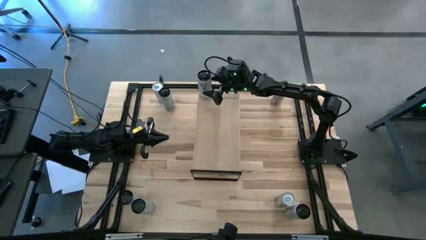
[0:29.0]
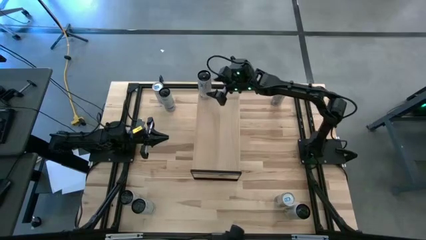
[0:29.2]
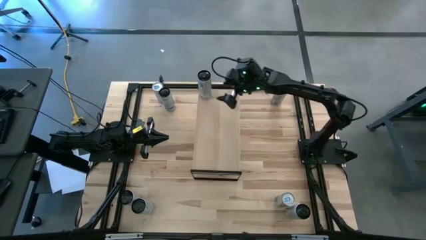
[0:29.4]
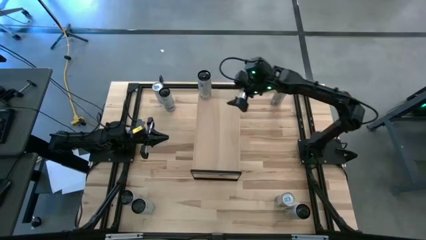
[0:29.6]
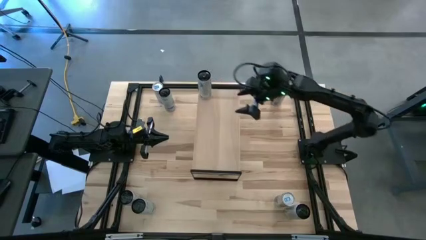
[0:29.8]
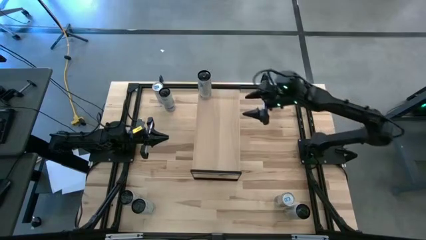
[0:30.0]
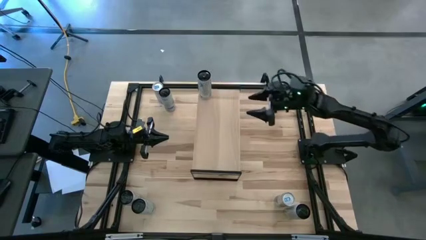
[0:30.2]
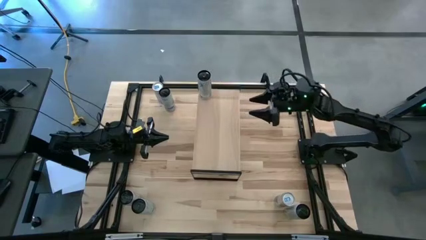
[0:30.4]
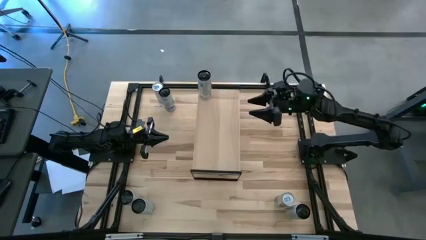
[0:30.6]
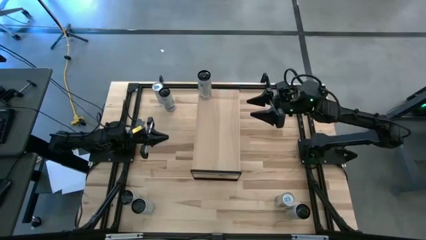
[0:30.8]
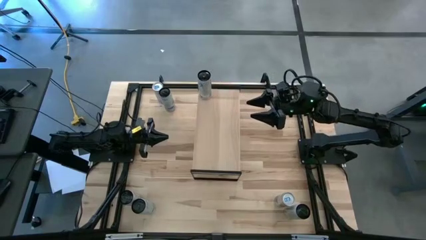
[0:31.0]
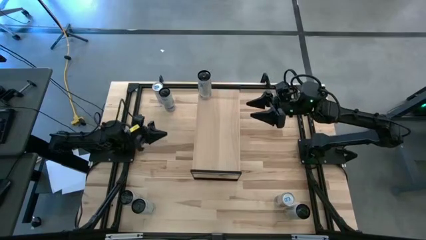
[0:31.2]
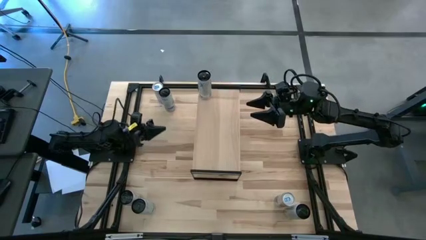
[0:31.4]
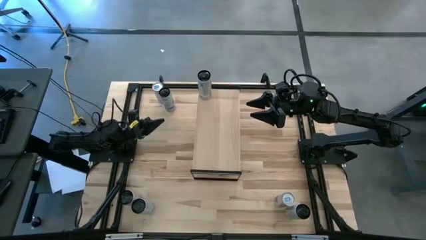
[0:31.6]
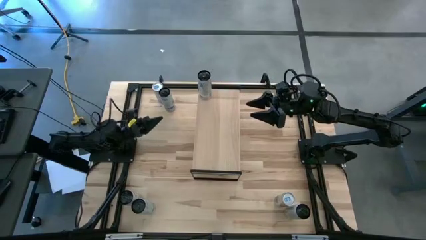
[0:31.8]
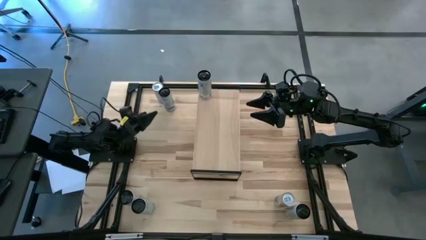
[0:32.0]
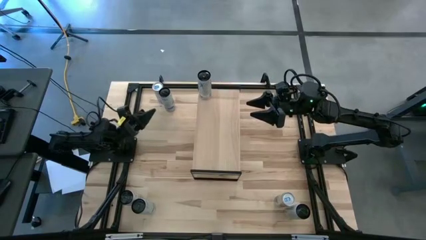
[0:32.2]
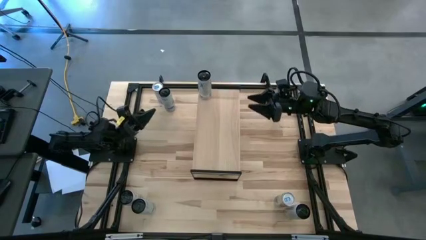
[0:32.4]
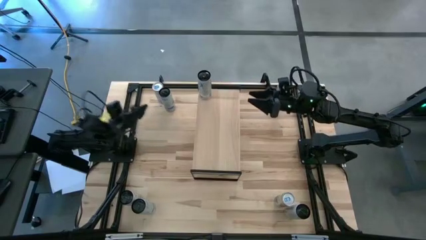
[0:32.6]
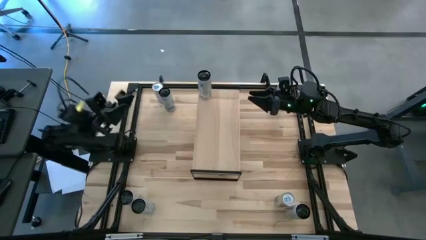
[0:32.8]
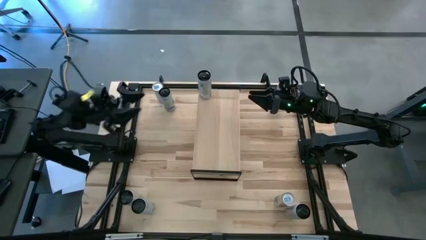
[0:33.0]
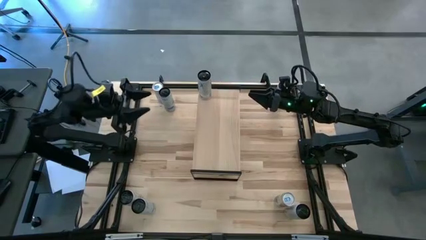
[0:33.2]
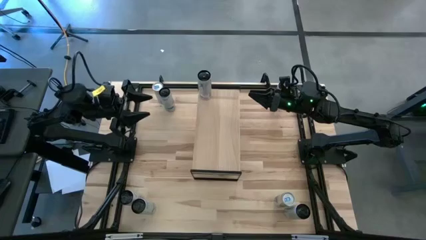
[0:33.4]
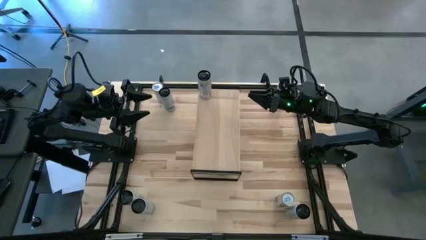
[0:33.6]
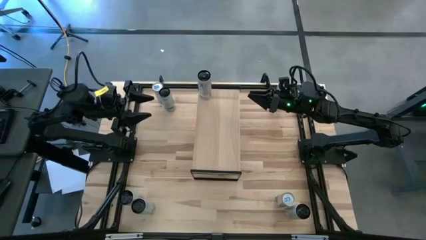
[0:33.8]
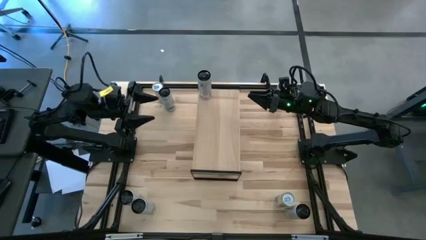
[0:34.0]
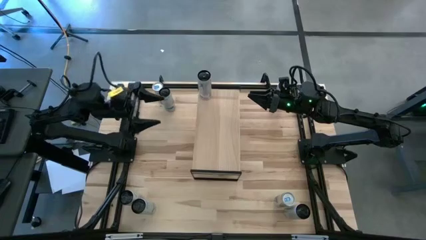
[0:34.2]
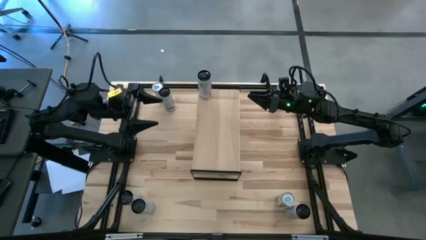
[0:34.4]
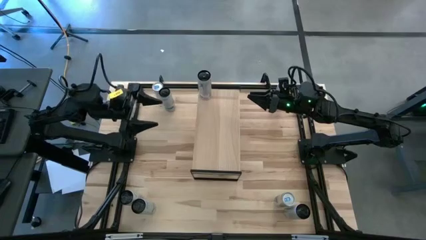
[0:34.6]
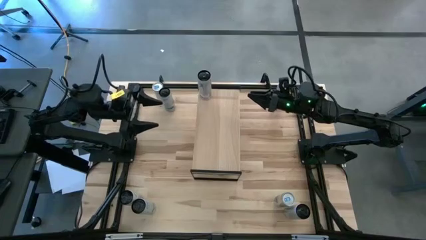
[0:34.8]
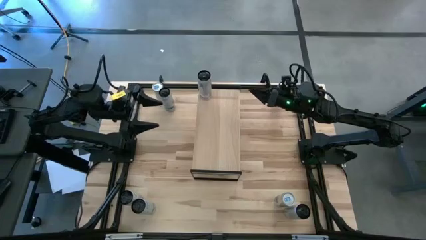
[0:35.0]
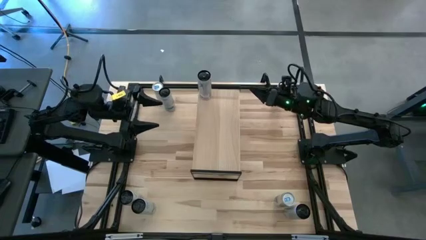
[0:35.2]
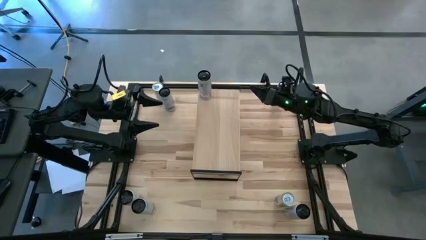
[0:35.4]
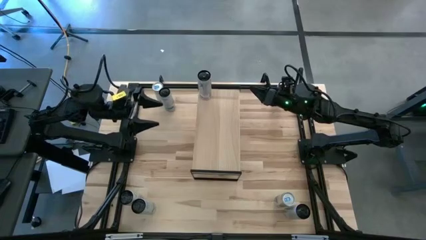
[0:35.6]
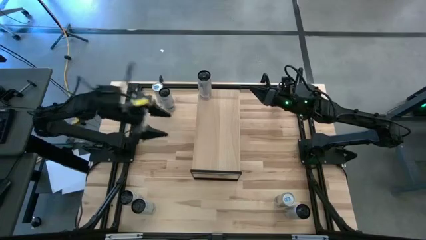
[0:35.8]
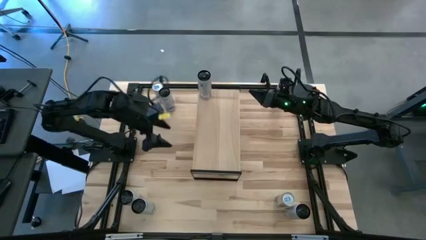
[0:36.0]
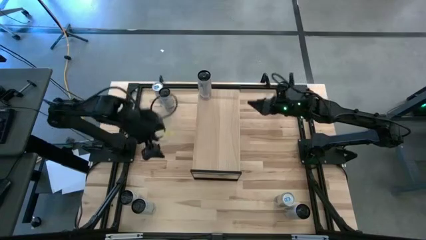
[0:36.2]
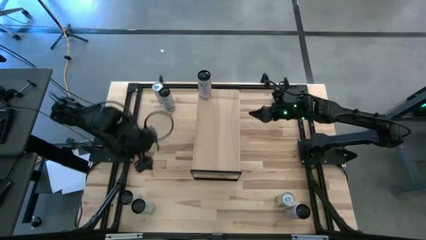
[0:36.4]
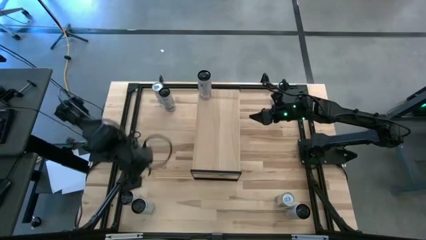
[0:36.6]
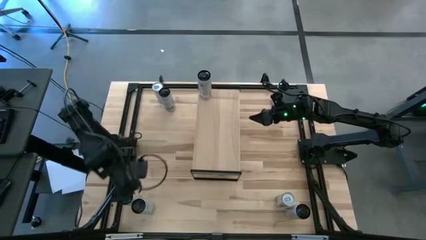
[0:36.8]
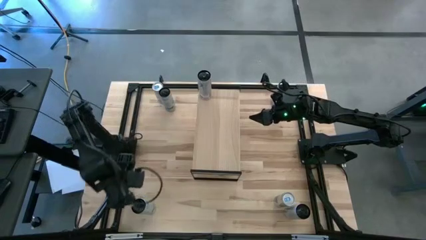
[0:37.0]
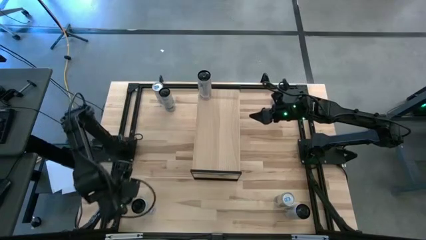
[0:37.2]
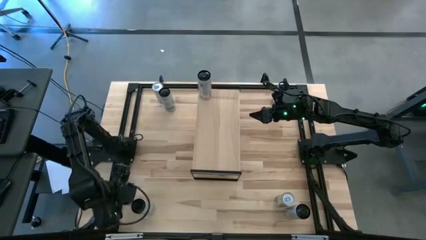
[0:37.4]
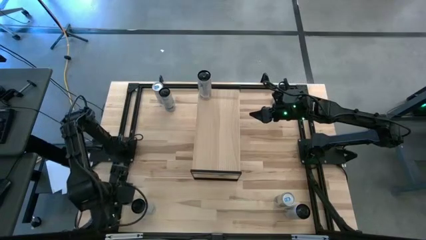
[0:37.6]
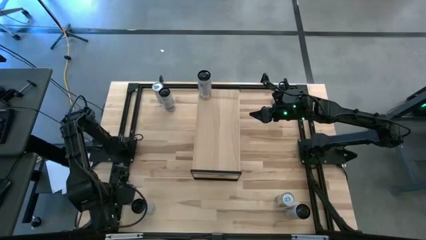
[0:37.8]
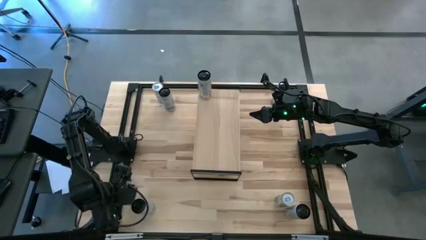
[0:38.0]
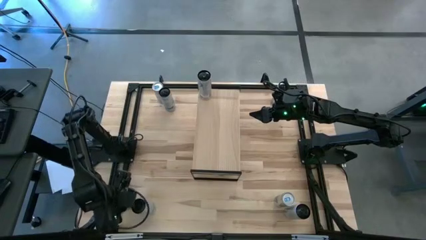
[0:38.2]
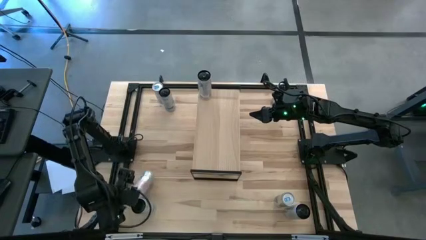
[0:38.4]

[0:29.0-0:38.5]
Task: Place canned beverage on shelf
Put the white pink soda can on the shelf aligned with the white pink soda can
